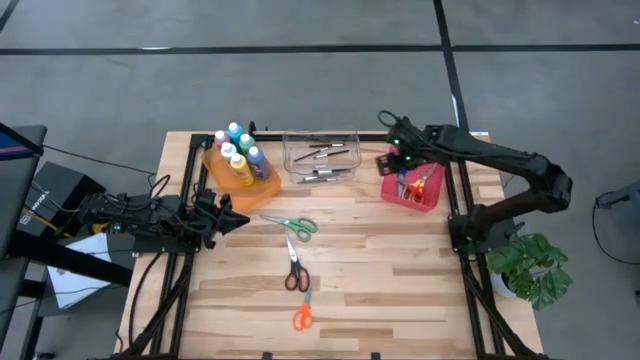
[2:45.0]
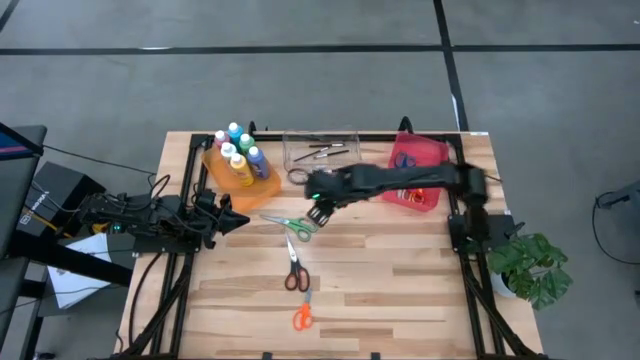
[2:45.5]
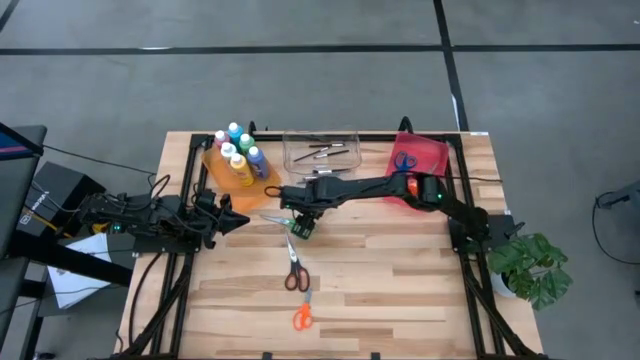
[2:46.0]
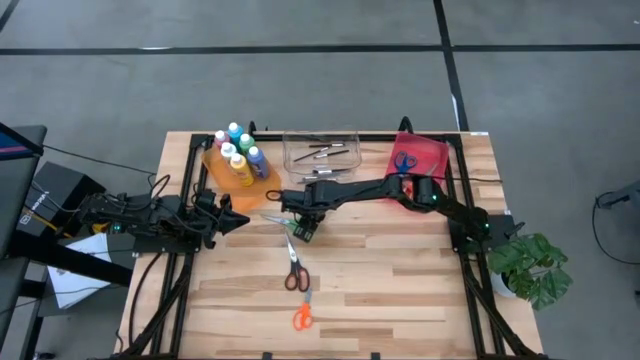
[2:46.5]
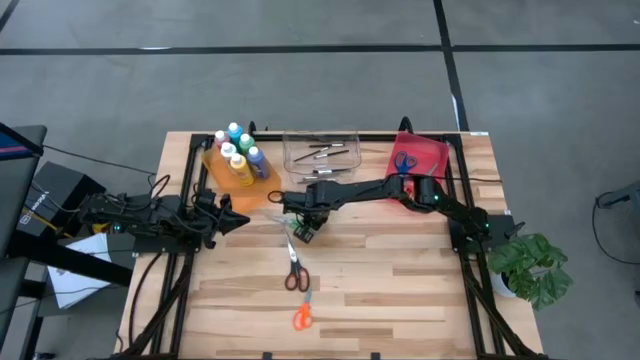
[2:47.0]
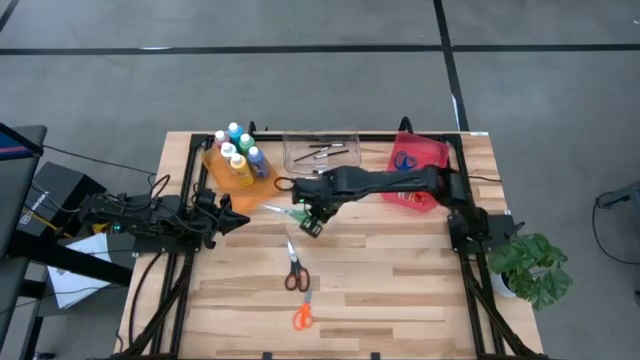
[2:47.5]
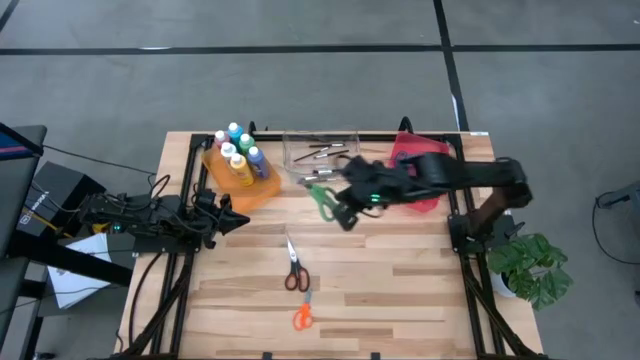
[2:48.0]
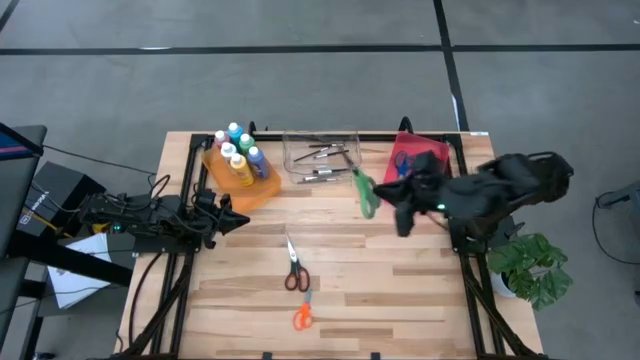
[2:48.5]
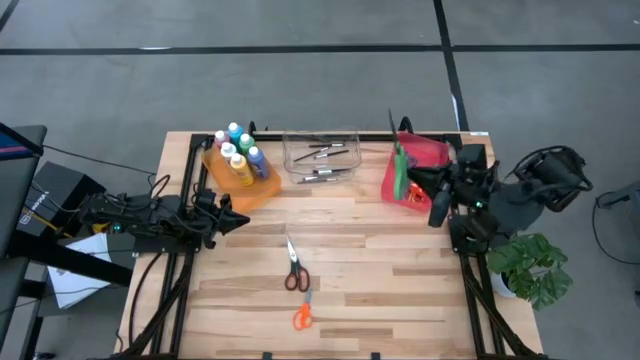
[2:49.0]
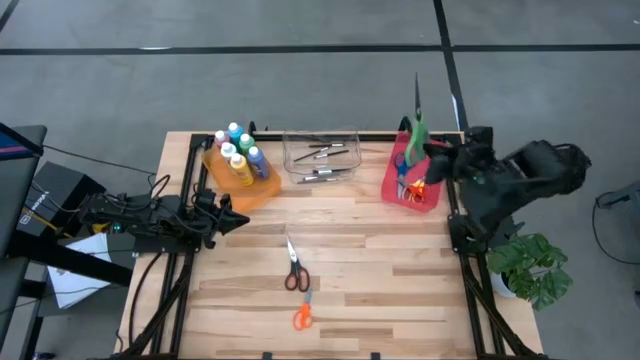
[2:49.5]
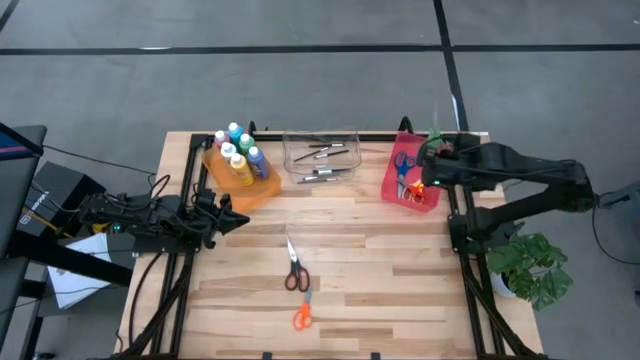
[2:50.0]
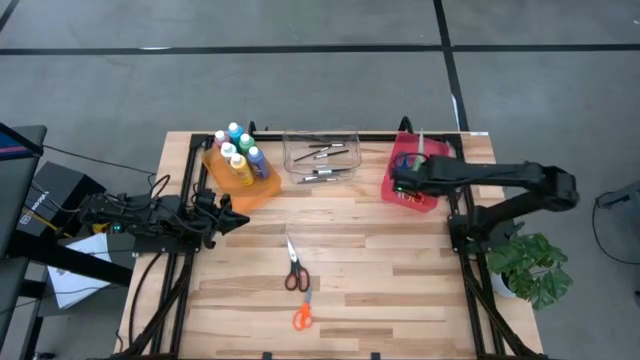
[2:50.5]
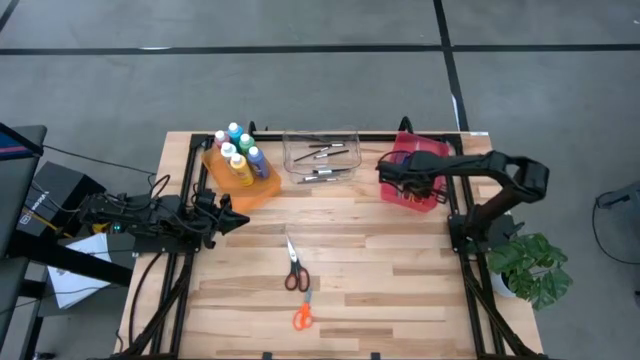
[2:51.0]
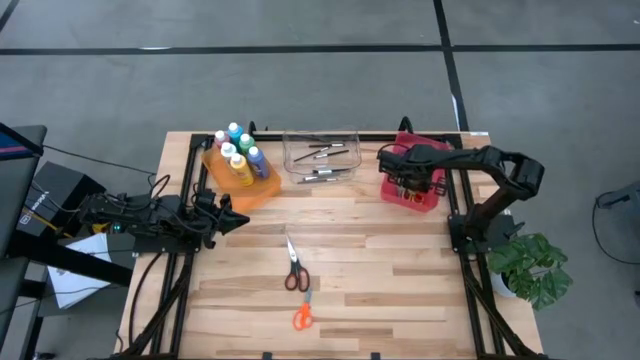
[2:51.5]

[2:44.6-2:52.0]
Task: Pick & Place Paint Supplies
Put the green scissor into the red bin

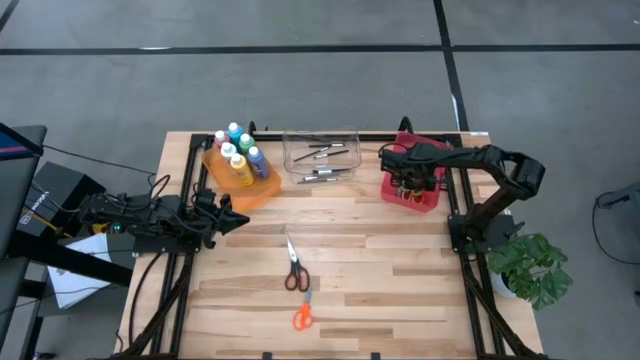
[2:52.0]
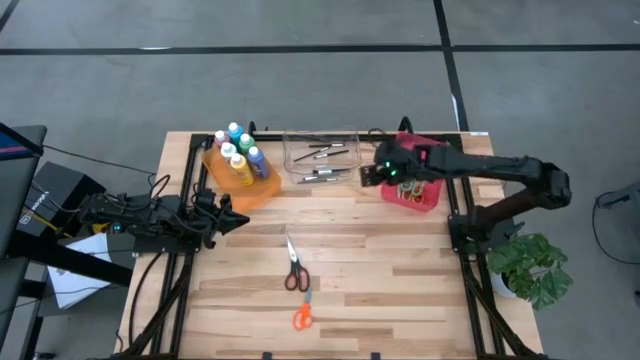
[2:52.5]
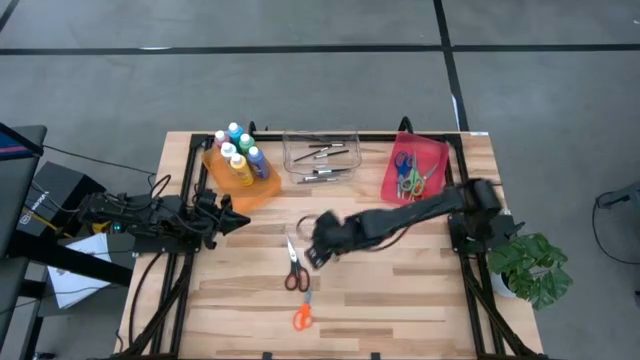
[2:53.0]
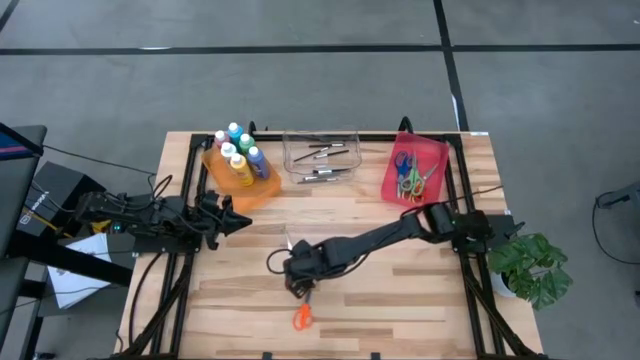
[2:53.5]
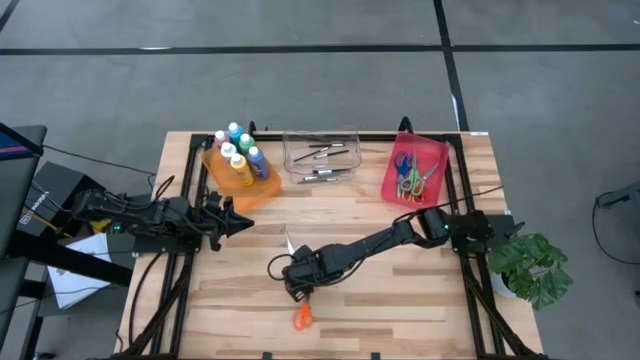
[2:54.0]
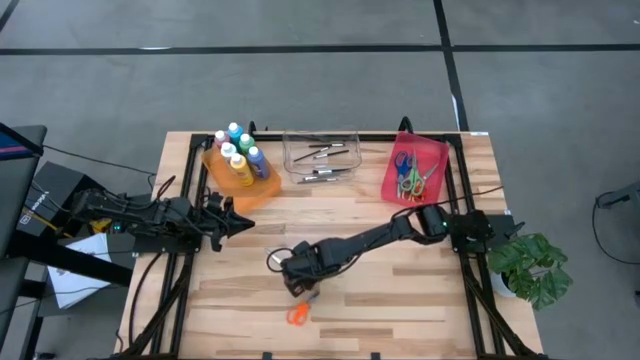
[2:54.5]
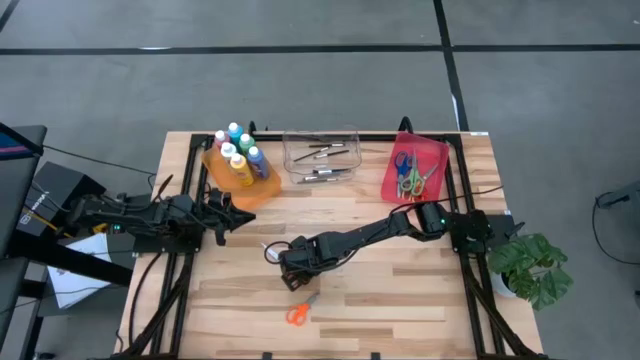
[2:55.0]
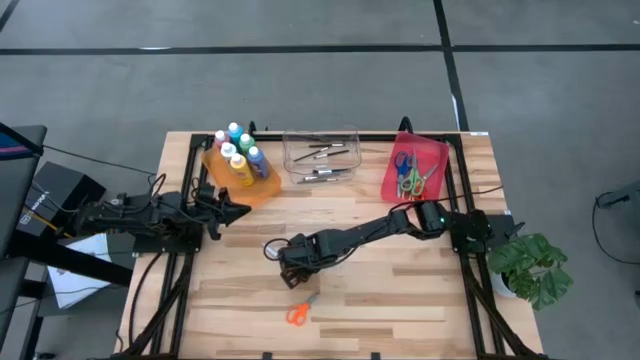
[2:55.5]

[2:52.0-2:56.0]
Put the black scissor into the red bin

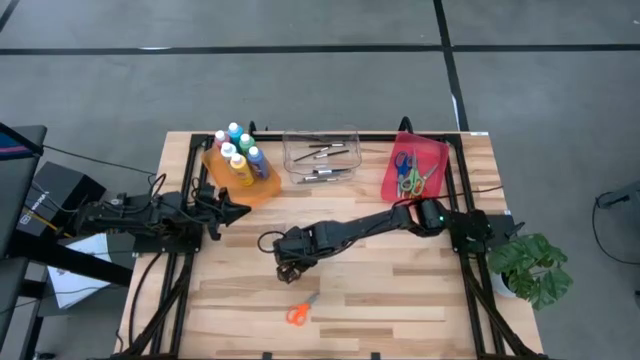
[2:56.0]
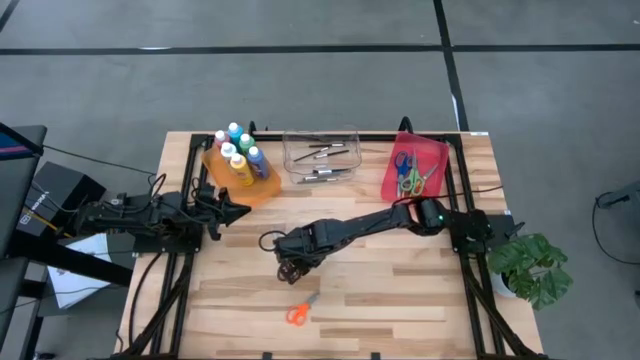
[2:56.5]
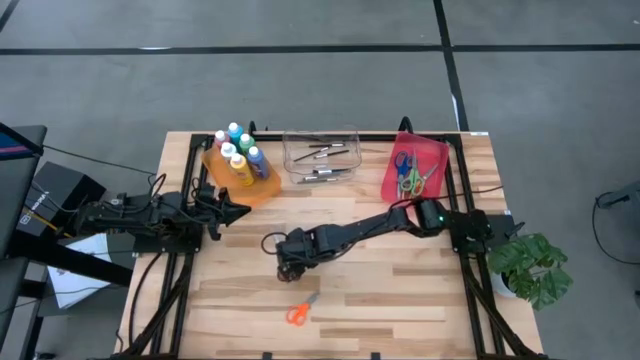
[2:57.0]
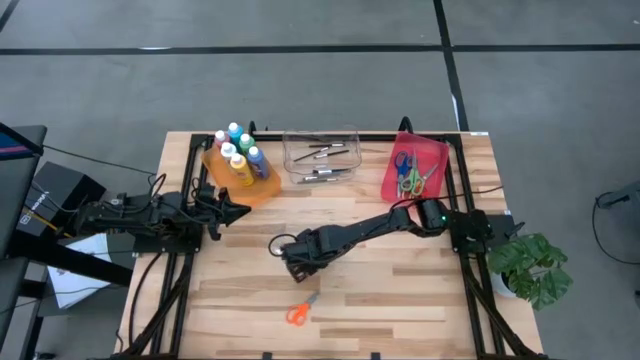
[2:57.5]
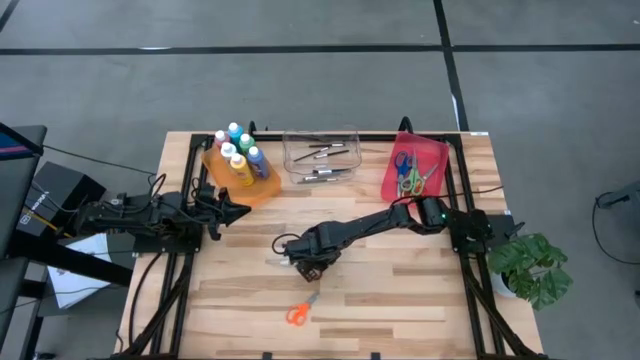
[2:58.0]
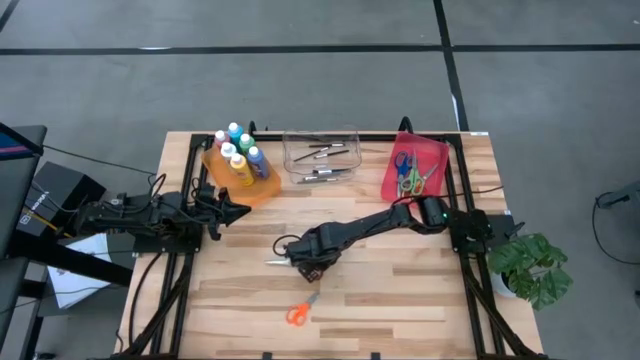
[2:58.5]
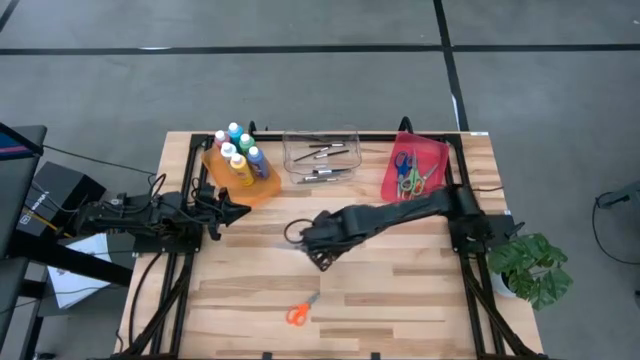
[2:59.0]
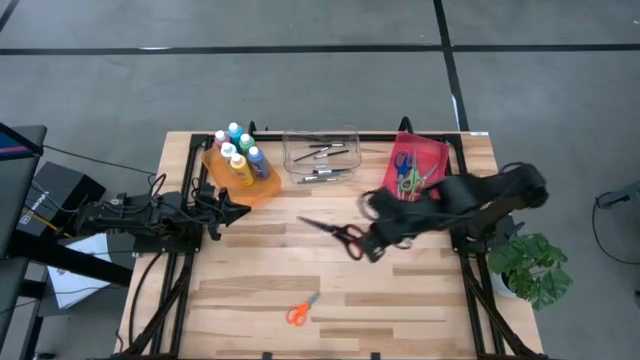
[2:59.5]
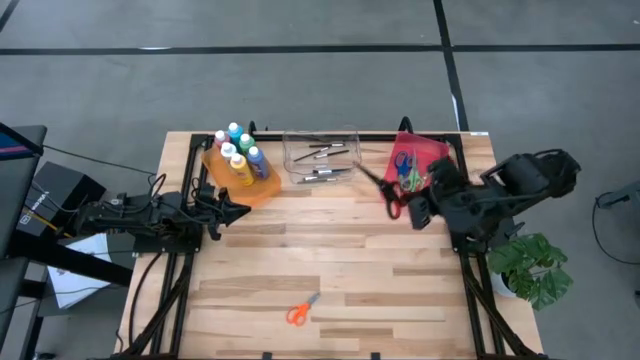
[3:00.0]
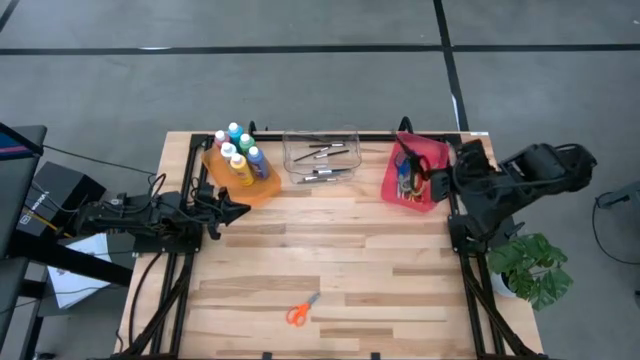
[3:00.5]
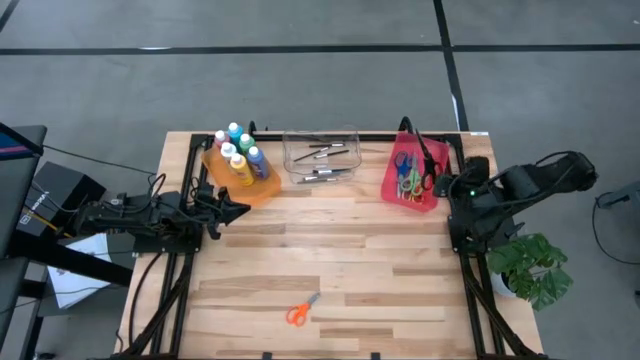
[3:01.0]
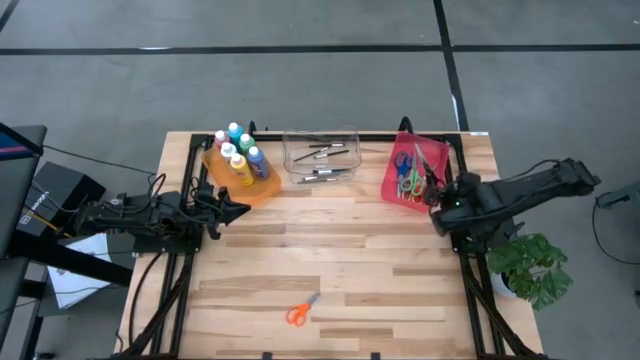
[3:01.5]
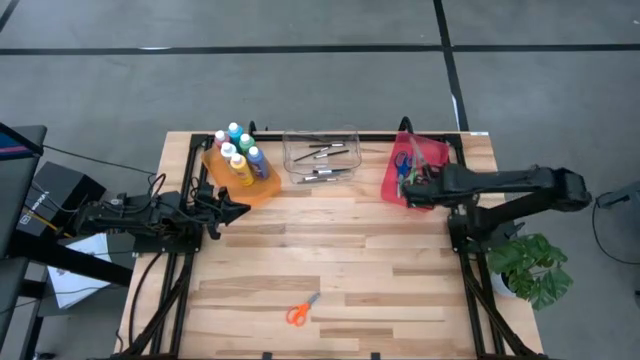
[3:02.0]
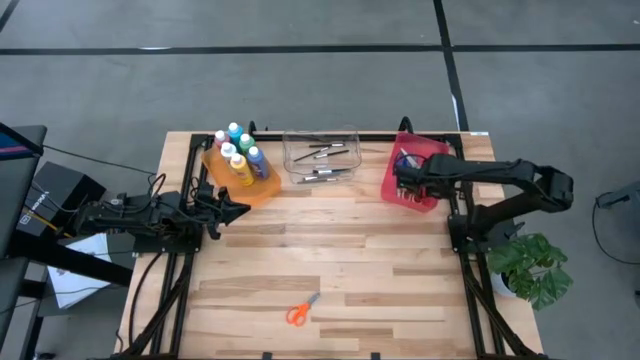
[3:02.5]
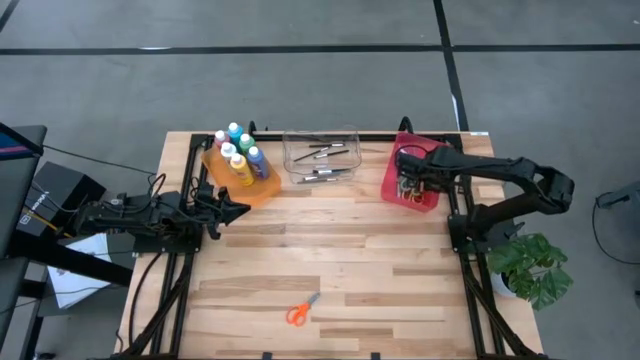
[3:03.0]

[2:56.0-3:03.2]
Put the black scissor into the red bin

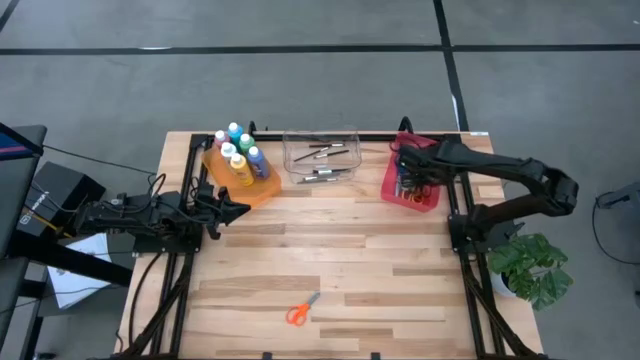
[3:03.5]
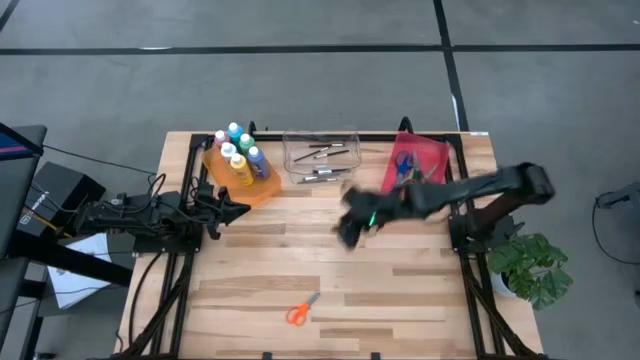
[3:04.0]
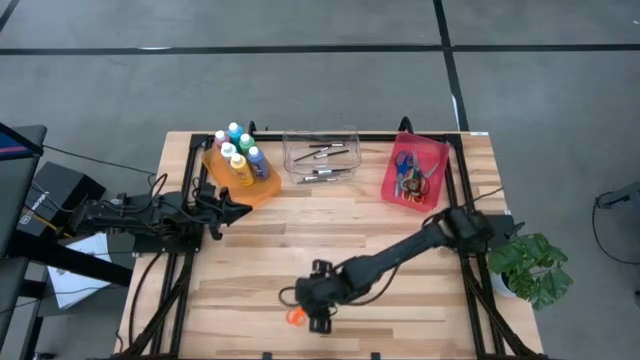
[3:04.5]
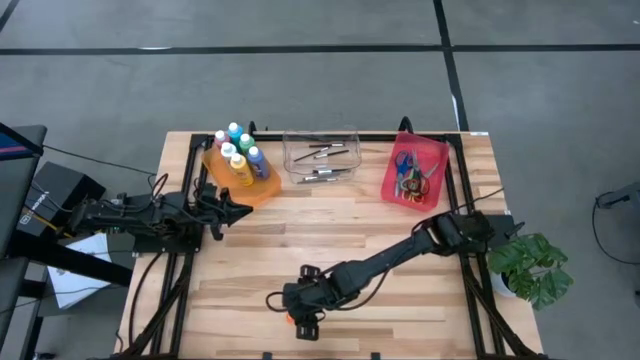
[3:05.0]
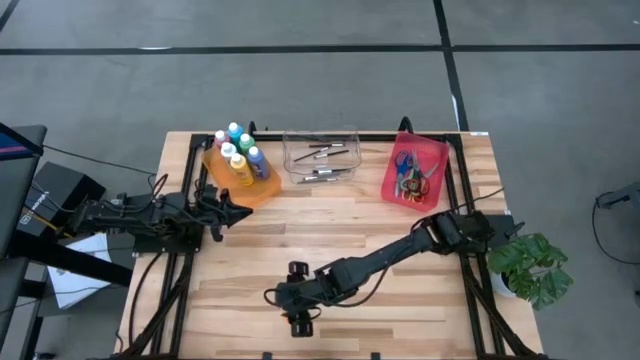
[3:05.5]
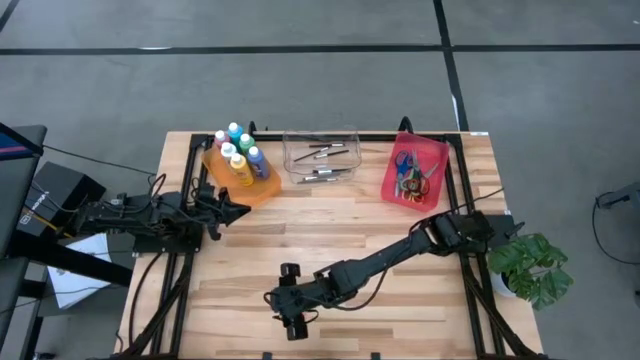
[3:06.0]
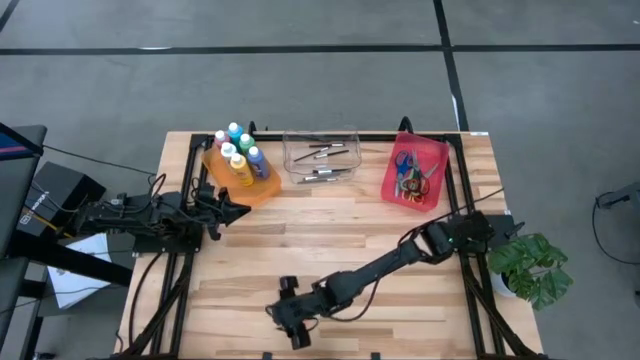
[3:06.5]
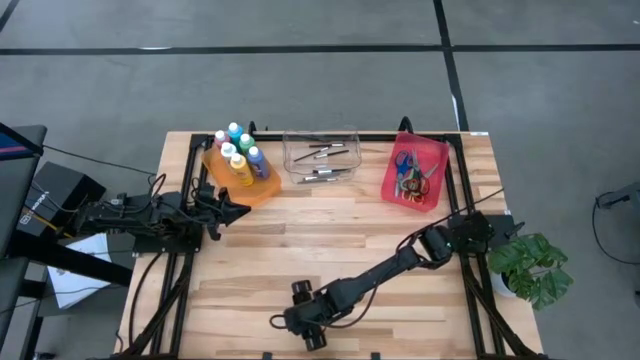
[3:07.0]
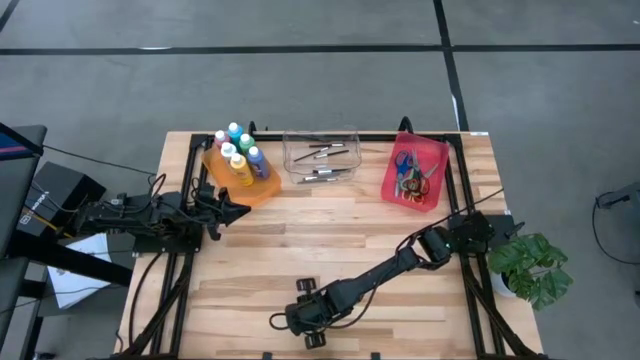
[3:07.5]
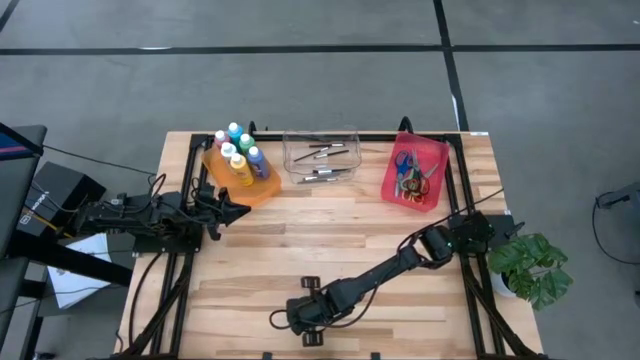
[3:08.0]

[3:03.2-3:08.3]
Put the orange scissor into the red bin
